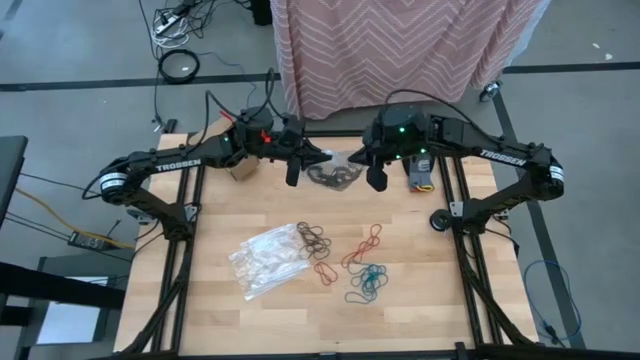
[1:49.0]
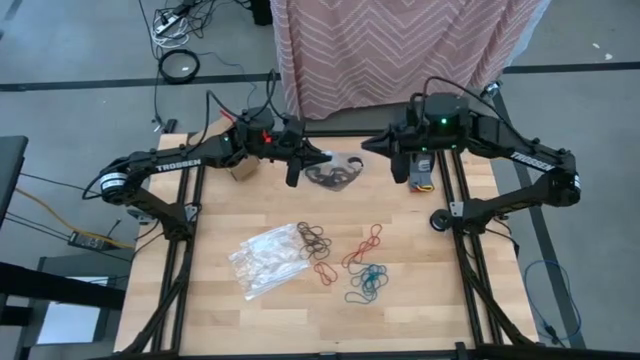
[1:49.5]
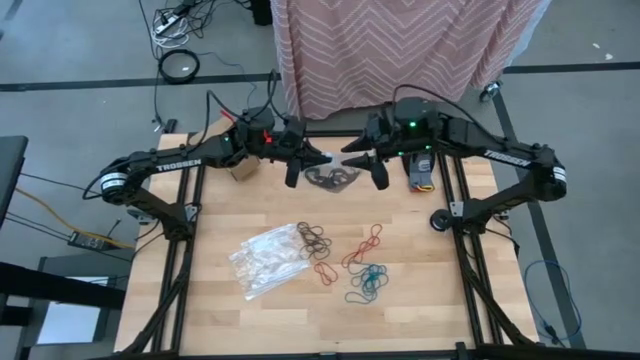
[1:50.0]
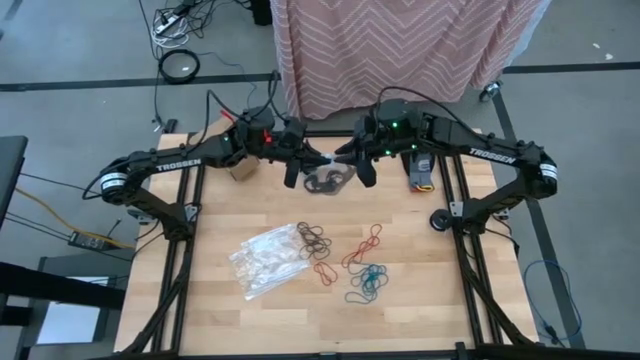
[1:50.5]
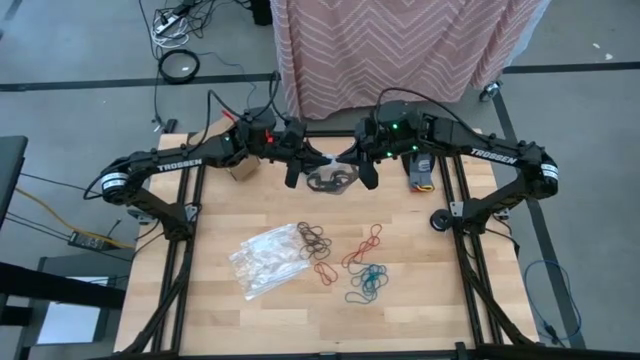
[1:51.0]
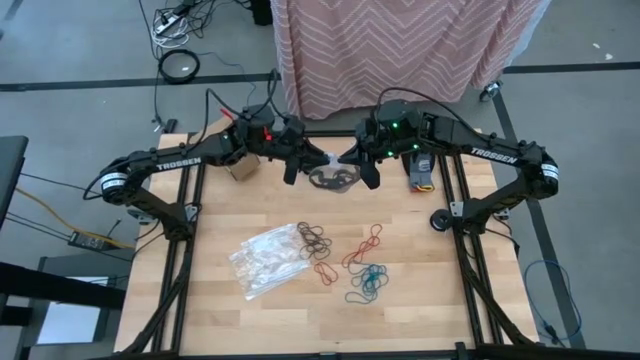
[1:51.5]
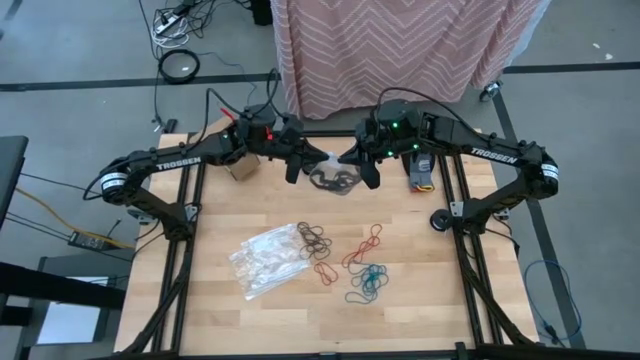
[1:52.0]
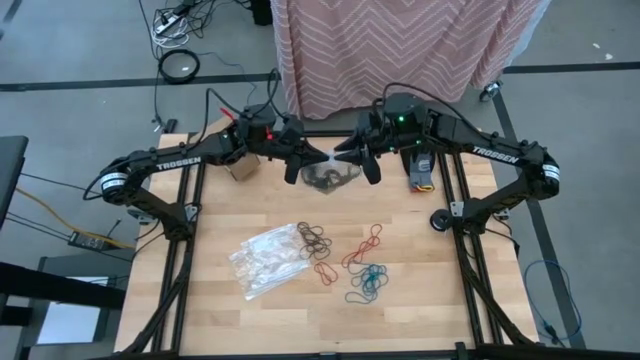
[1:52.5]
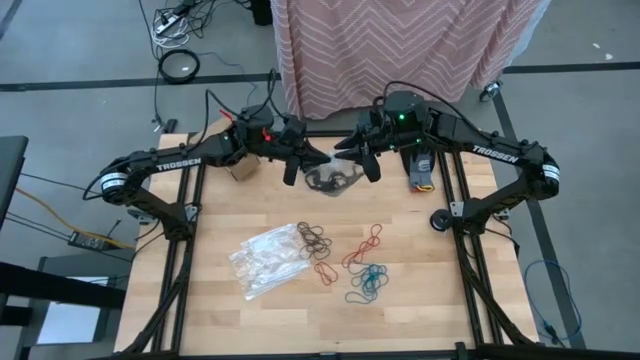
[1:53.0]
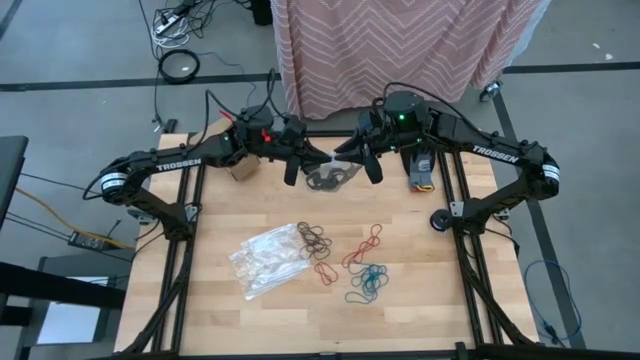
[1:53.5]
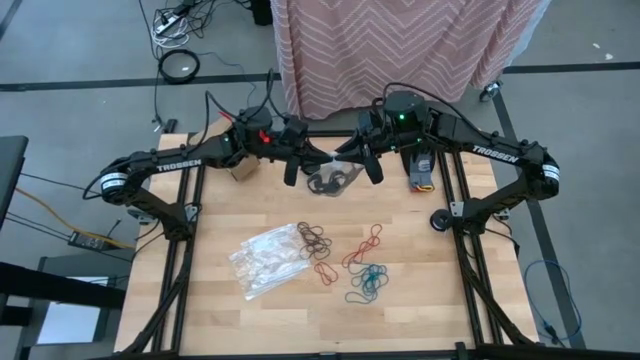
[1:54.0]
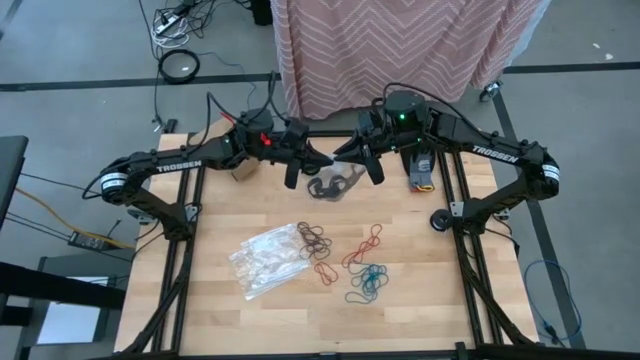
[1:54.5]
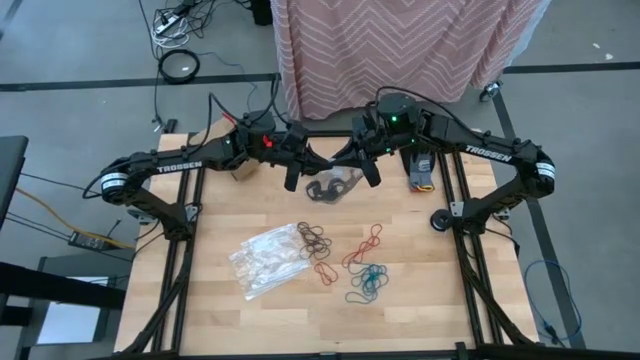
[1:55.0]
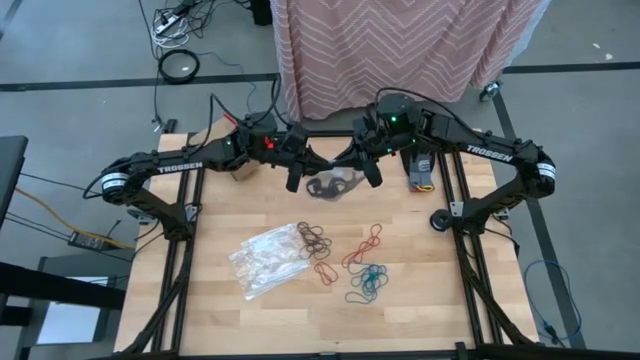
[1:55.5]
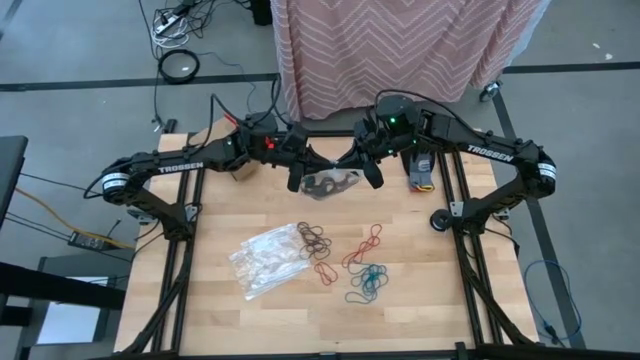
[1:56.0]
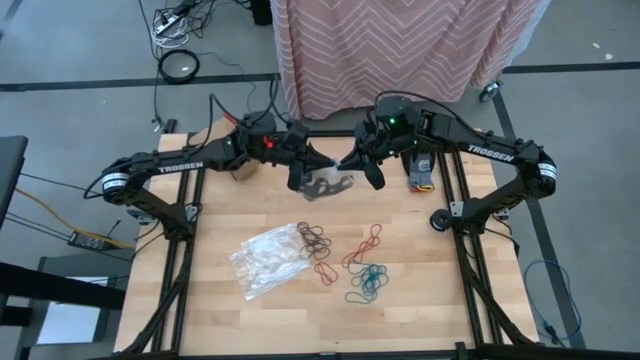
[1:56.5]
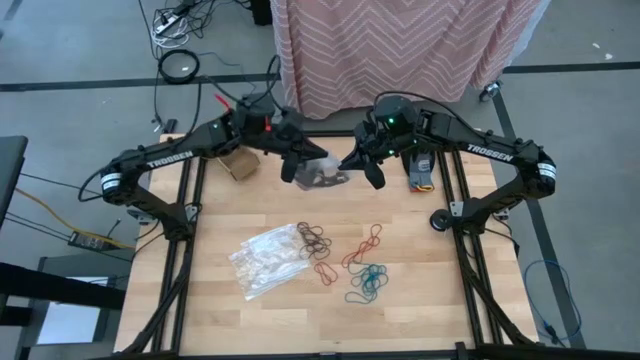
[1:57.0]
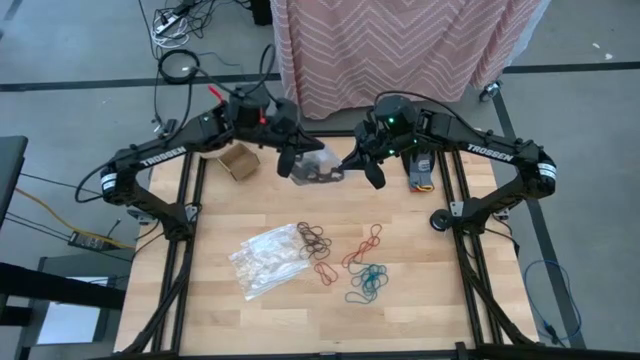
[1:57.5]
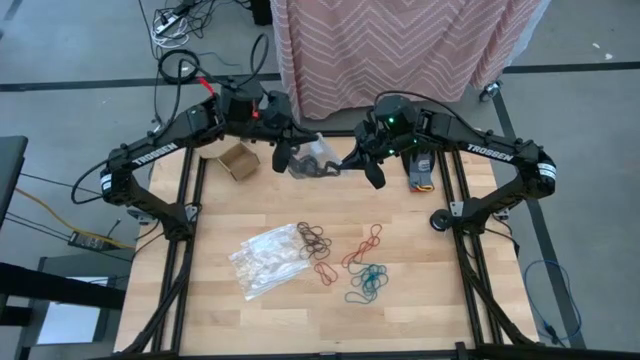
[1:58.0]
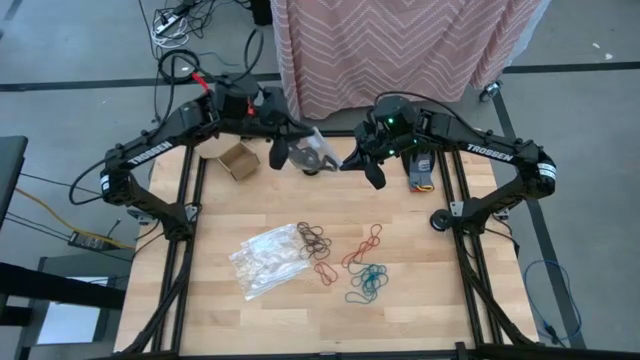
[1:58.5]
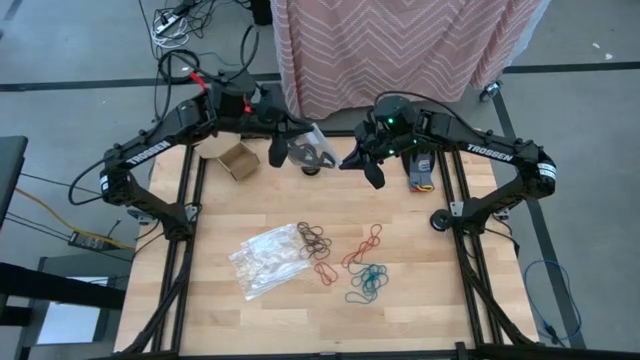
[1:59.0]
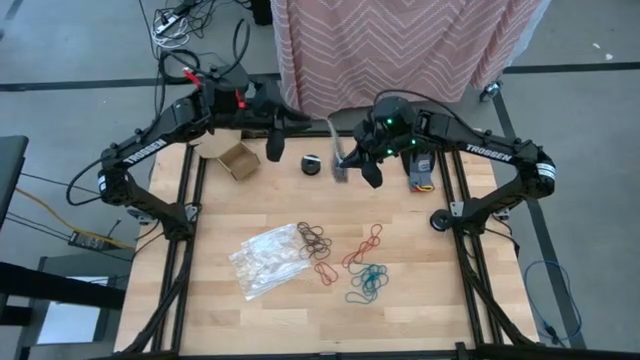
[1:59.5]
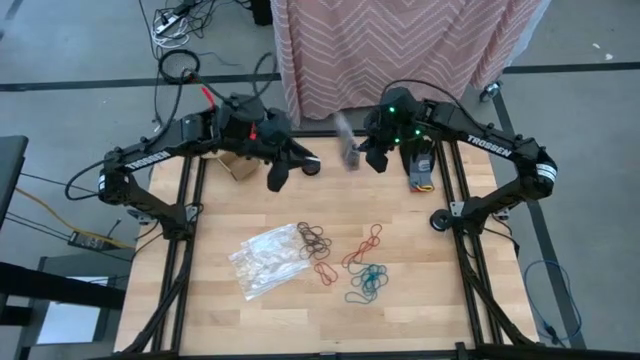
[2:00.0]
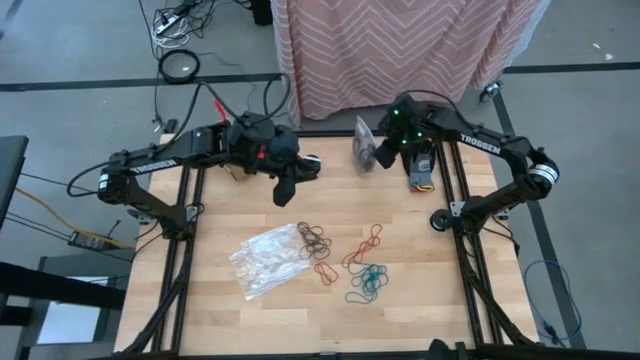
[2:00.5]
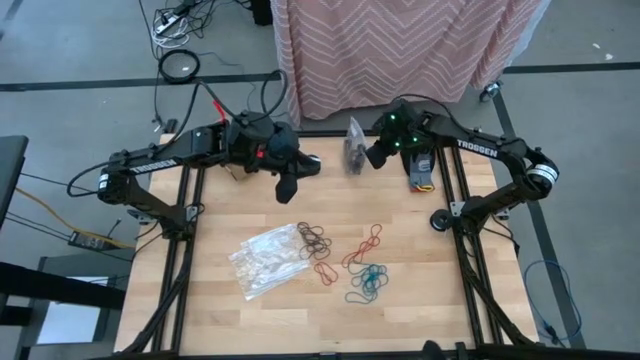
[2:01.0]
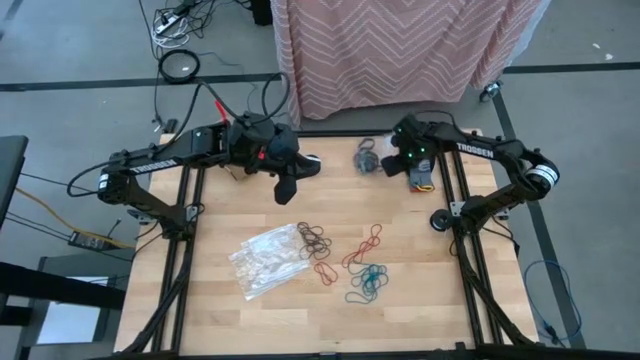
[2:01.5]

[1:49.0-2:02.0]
Task: Sort rubber bands
Close the transparent zip bag

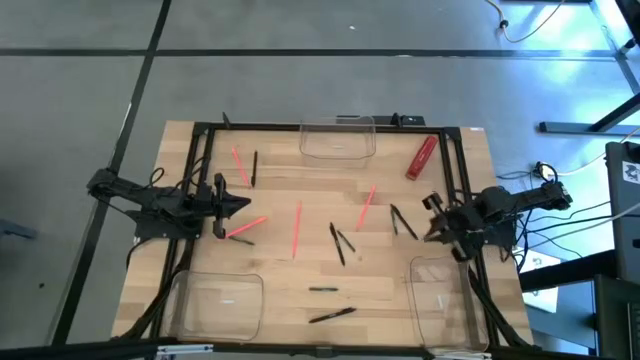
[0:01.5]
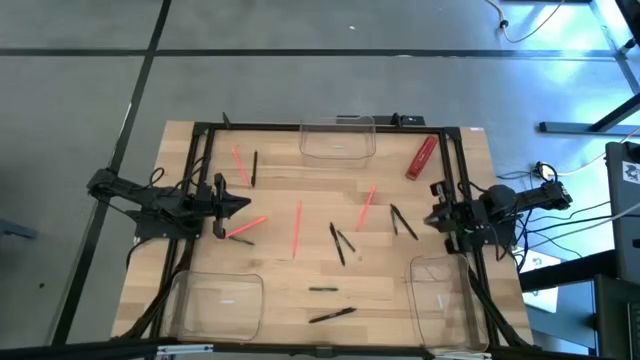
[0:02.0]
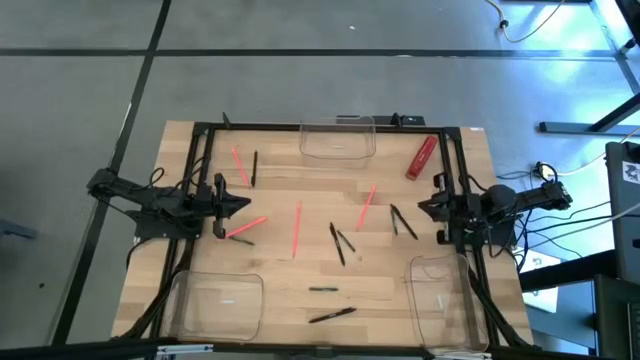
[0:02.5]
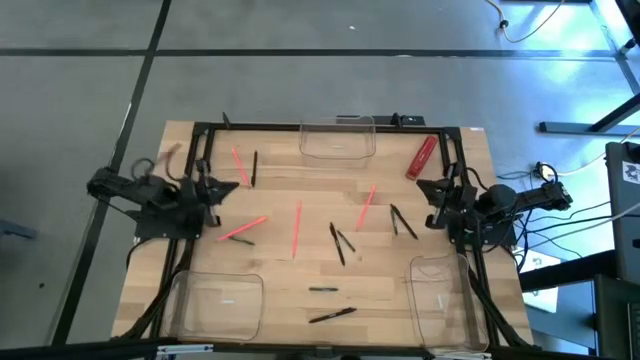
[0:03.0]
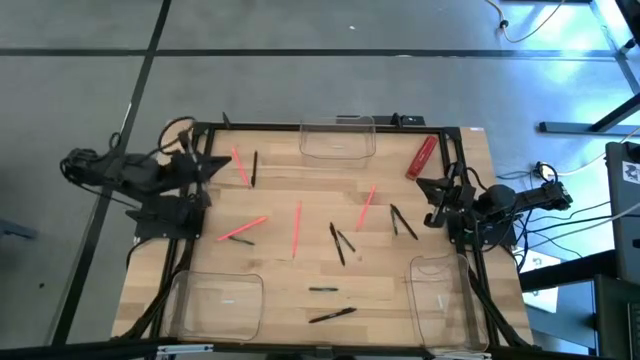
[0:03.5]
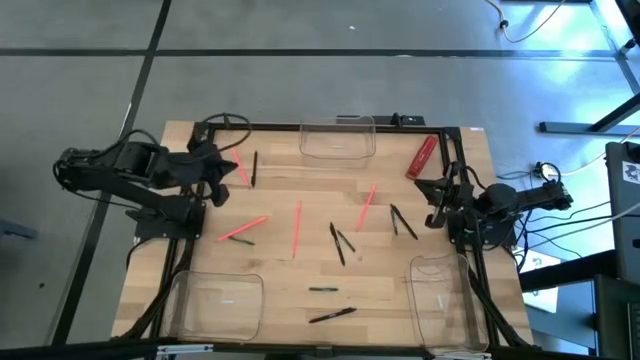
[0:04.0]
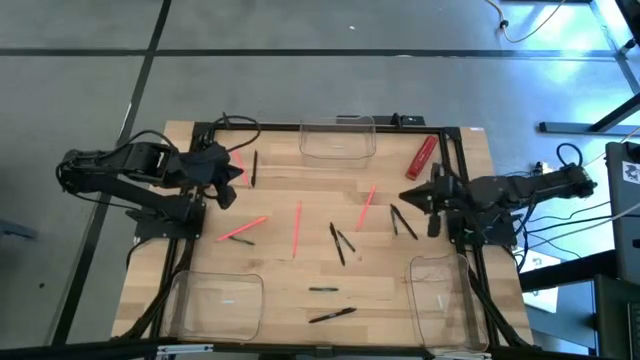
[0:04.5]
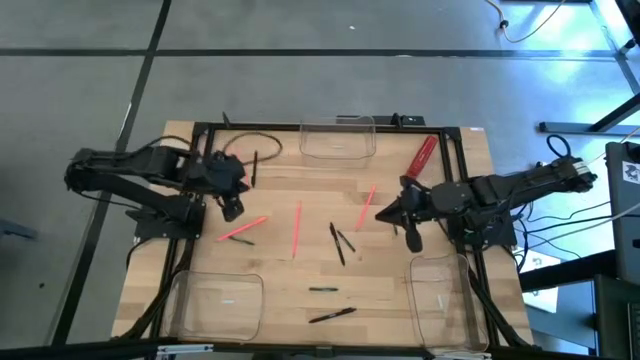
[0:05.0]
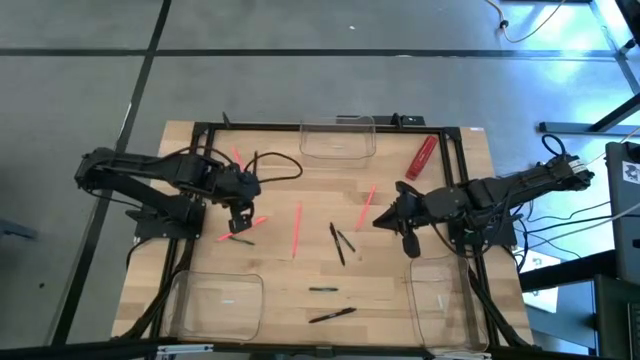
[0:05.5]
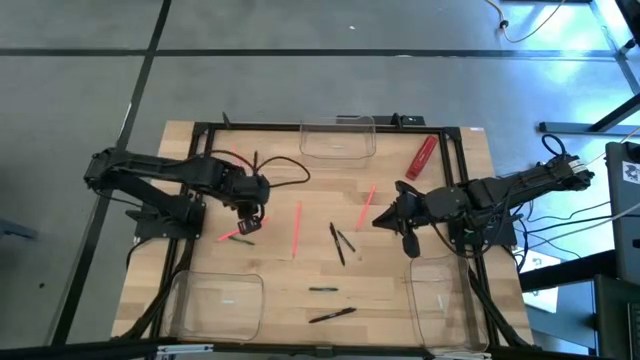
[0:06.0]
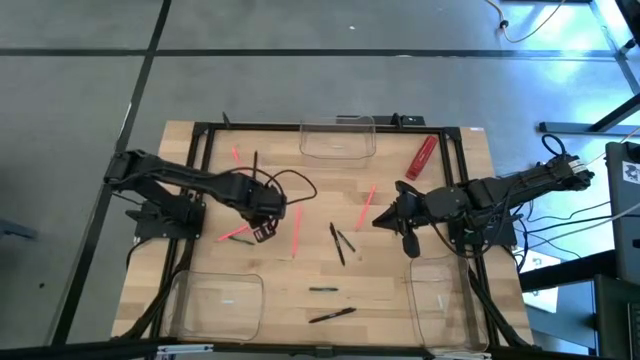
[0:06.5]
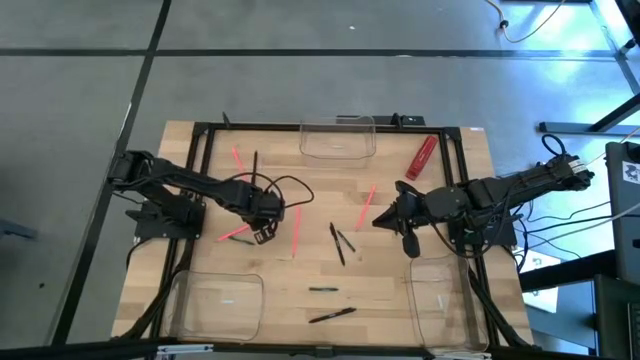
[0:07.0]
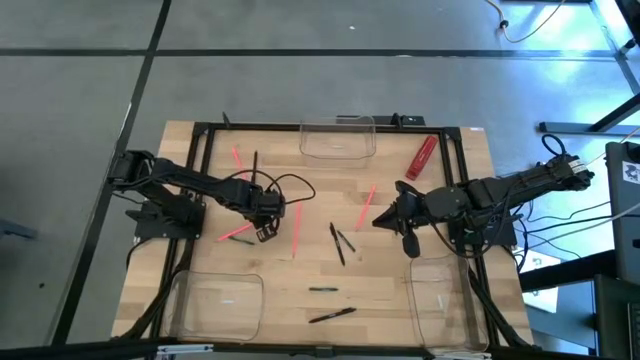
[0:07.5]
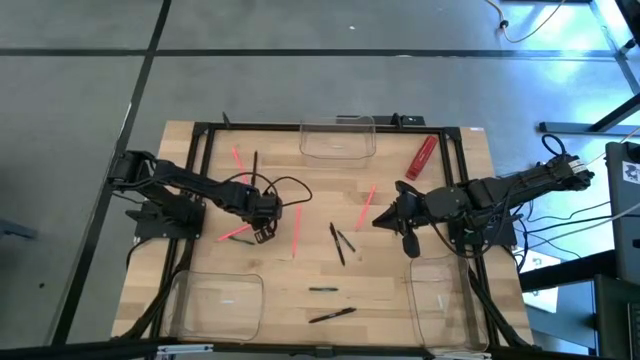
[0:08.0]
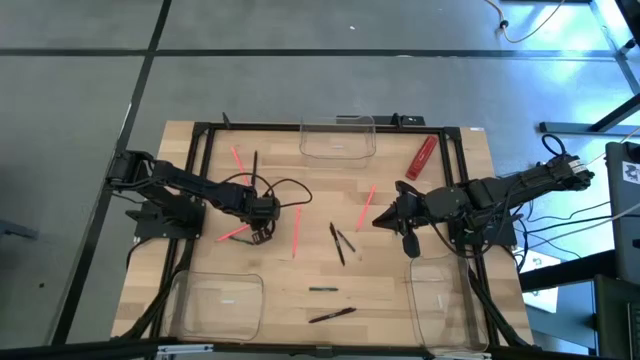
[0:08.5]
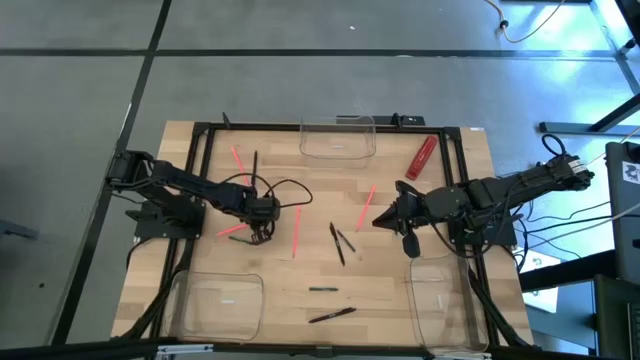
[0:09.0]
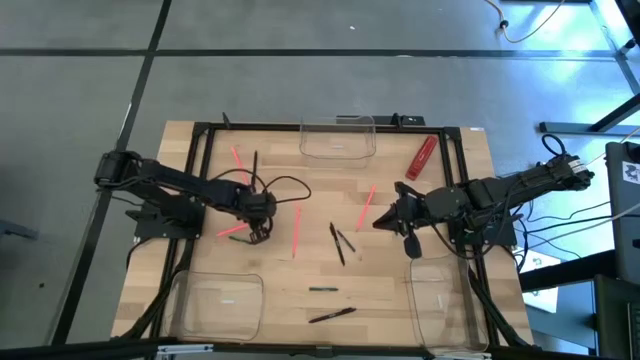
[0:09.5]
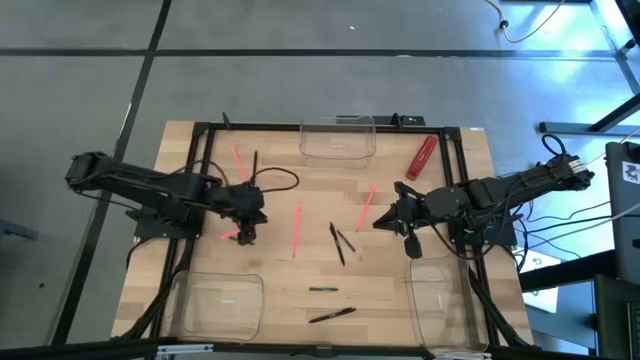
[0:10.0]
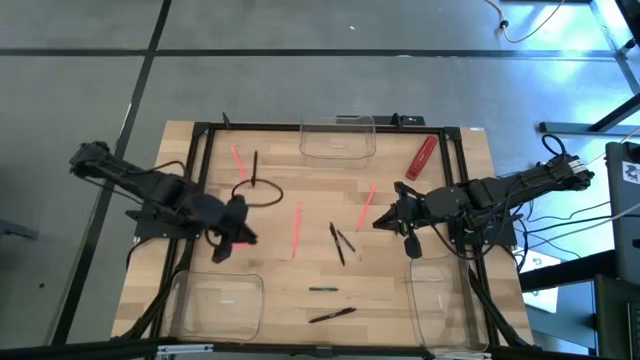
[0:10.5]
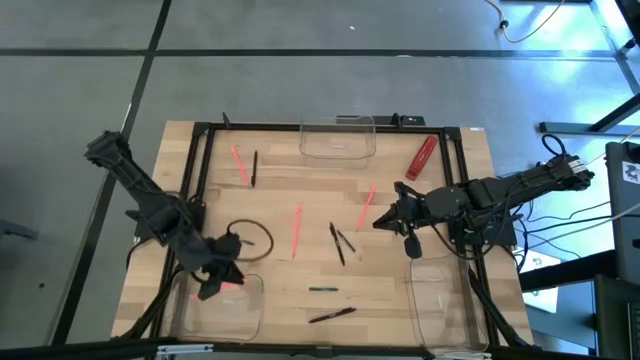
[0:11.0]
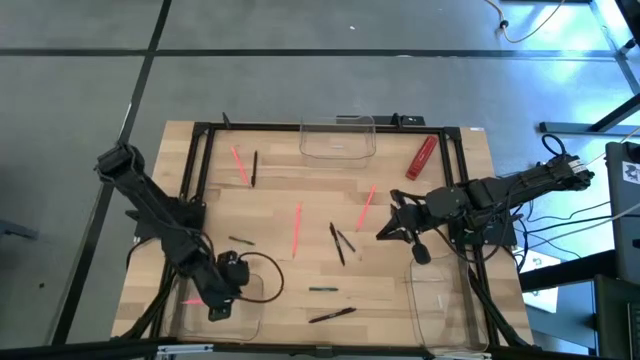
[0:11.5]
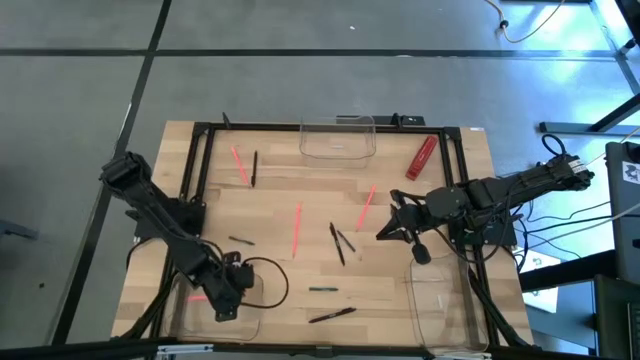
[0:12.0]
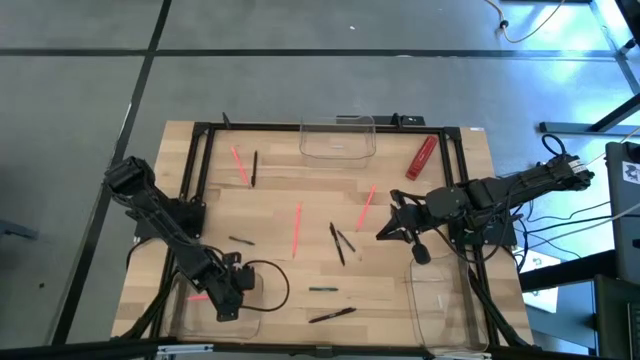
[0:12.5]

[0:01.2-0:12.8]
Task: Sort crayons/erasers/pens/pencils in bins
Put the pink colored pencil into the bottom left transparent bin
